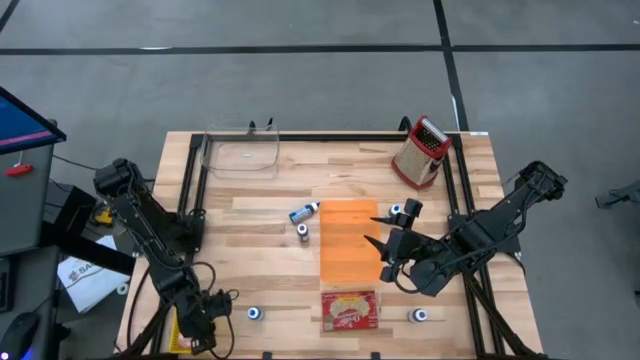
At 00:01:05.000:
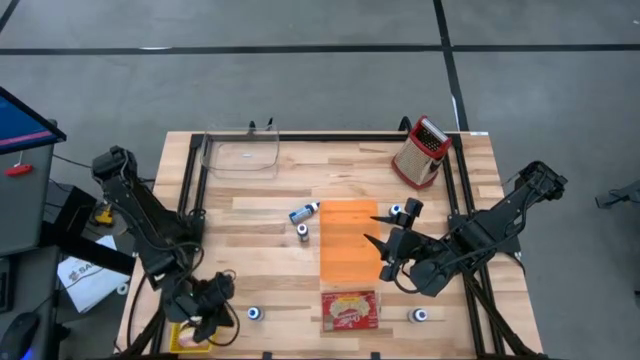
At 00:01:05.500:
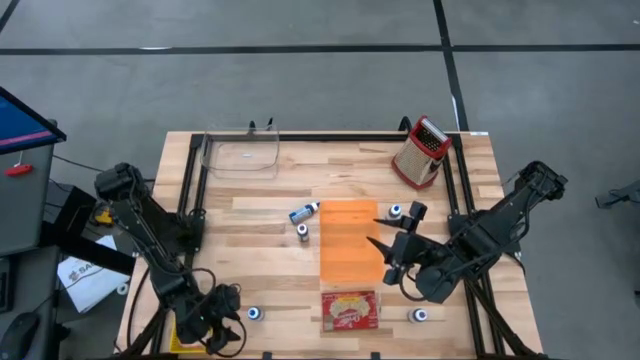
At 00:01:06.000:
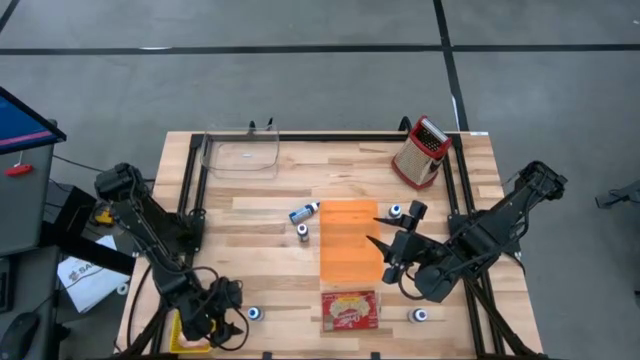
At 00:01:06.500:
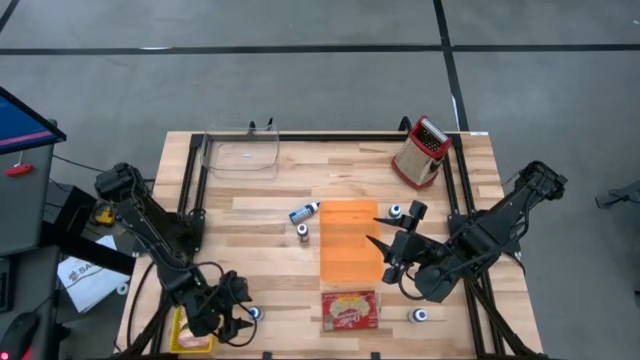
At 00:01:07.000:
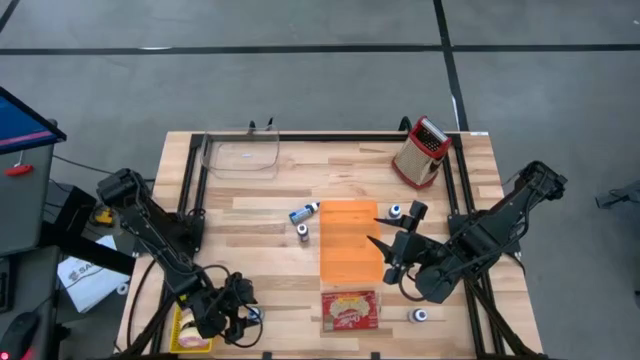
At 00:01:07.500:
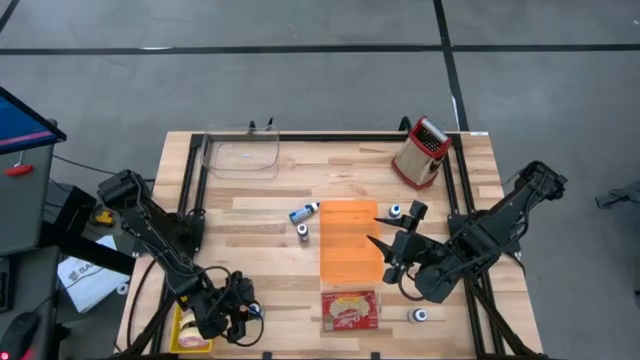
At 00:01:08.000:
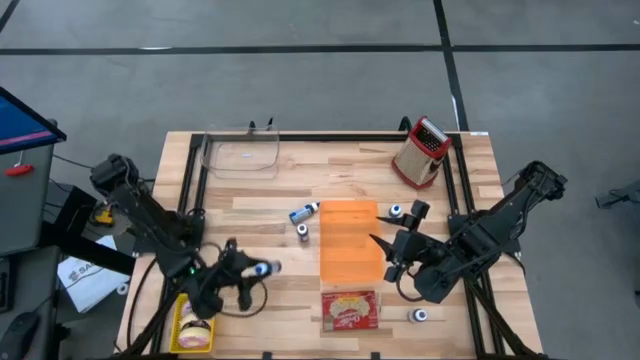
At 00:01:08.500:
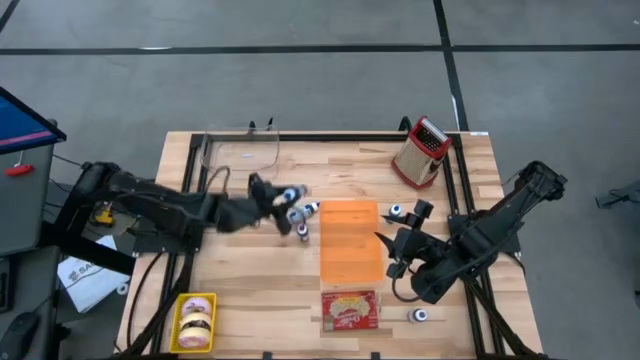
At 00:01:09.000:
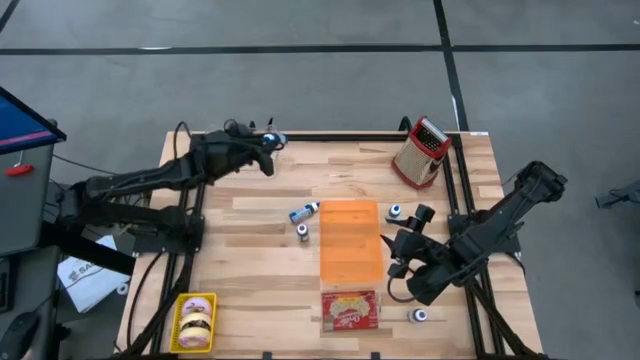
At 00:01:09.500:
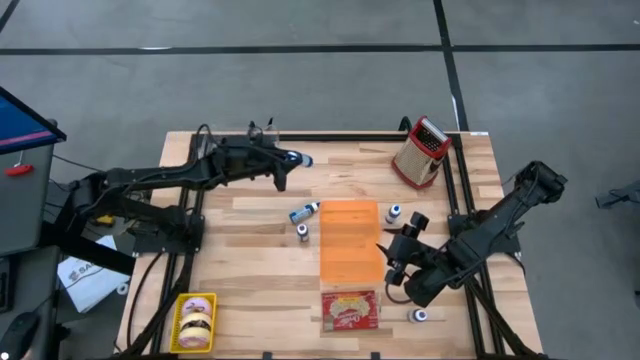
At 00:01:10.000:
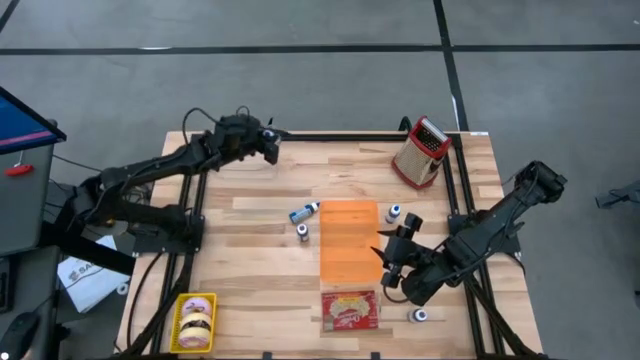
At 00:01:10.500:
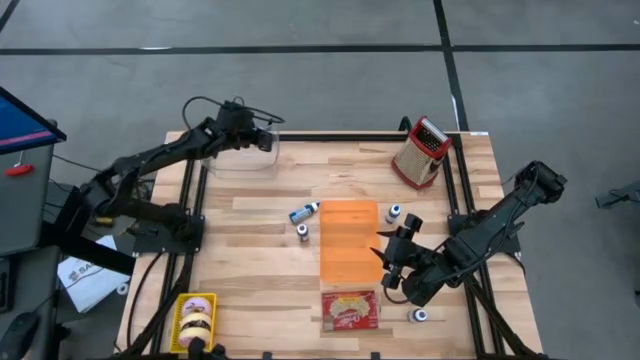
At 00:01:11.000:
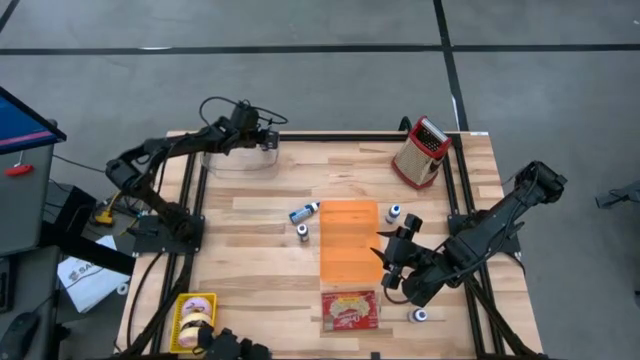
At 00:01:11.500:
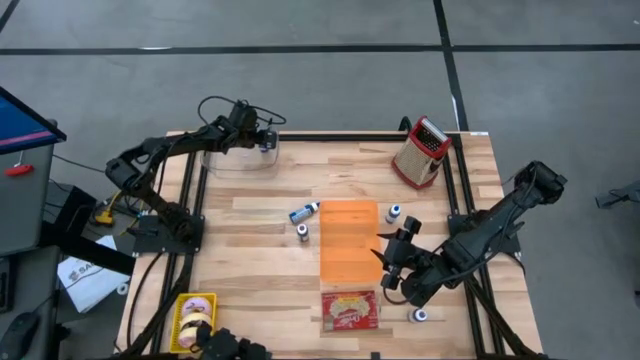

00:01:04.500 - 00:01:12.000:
Task: Pick & Place Food Item
Put the left blue food coloring bottle into the transparent bin

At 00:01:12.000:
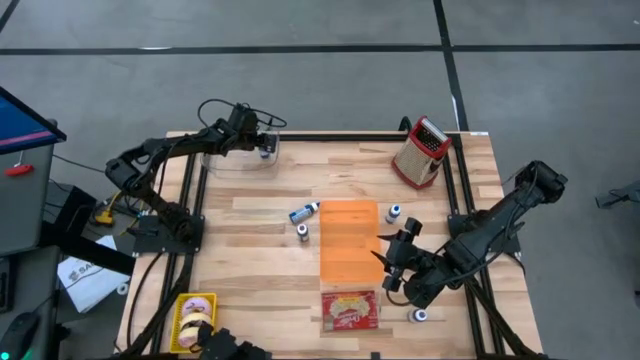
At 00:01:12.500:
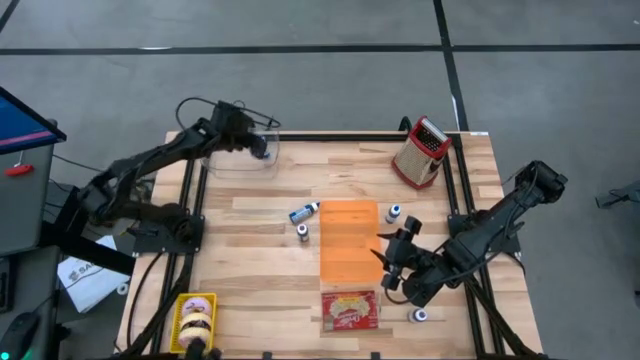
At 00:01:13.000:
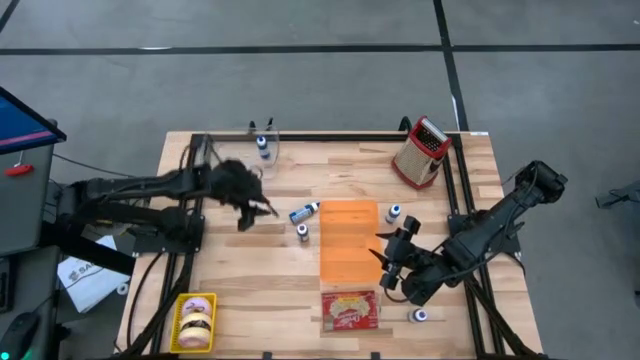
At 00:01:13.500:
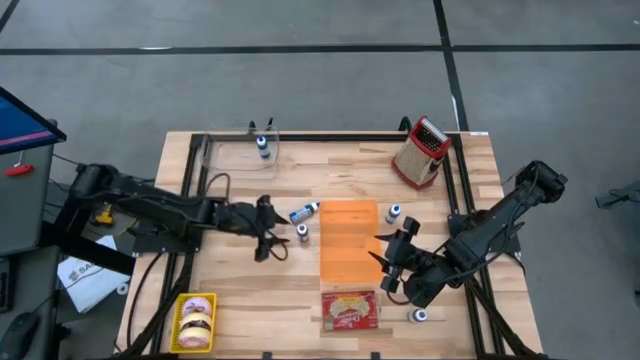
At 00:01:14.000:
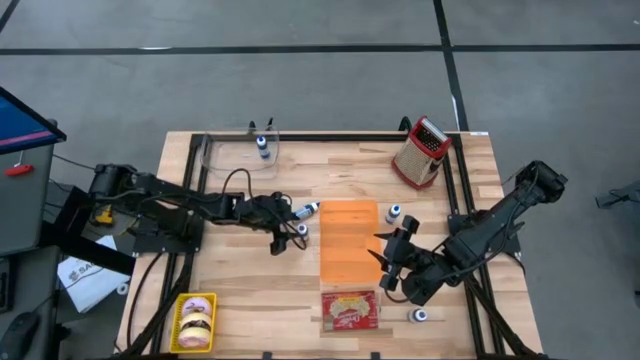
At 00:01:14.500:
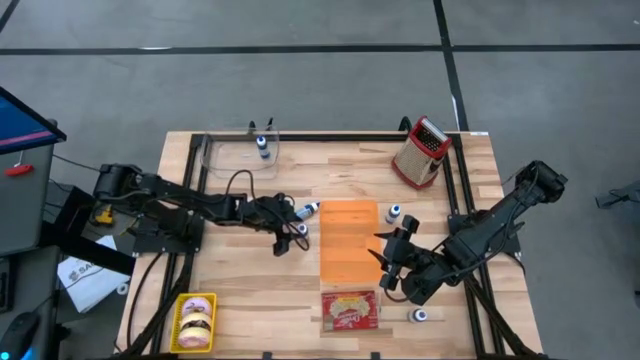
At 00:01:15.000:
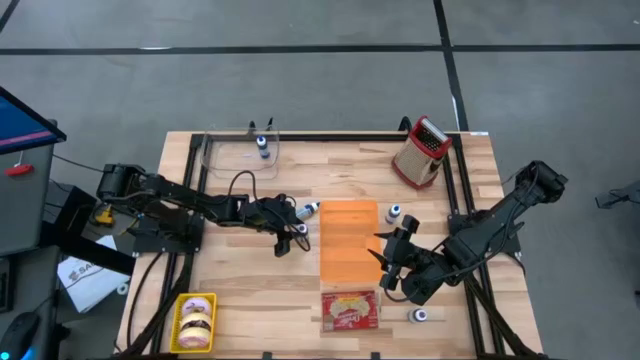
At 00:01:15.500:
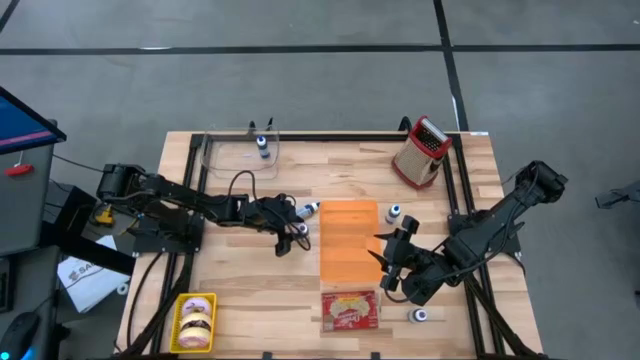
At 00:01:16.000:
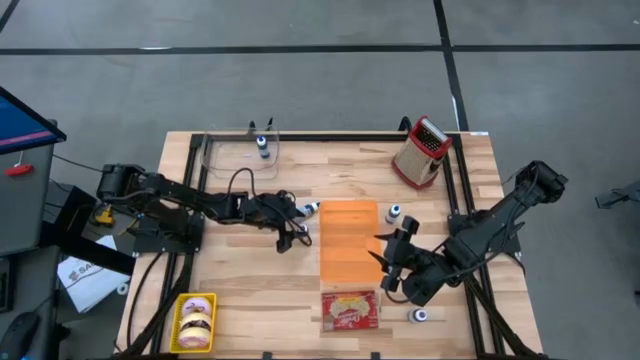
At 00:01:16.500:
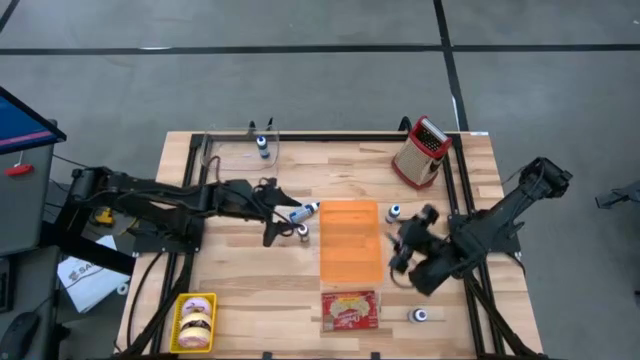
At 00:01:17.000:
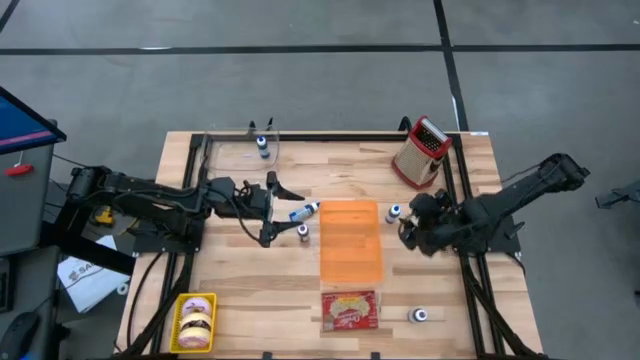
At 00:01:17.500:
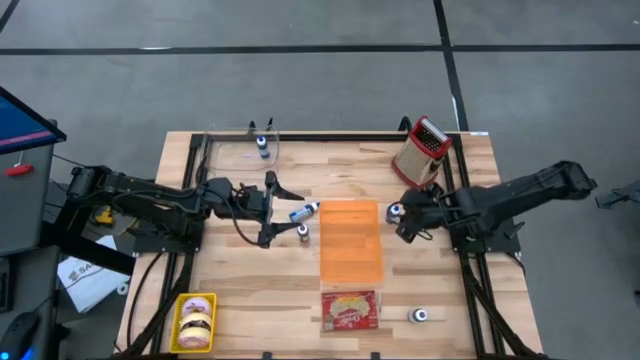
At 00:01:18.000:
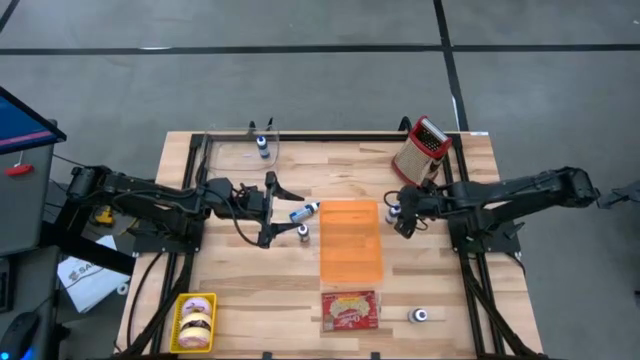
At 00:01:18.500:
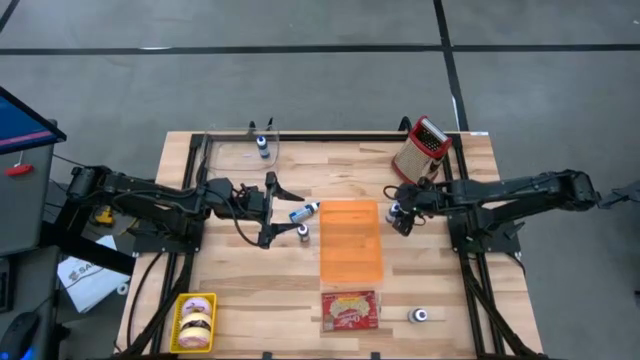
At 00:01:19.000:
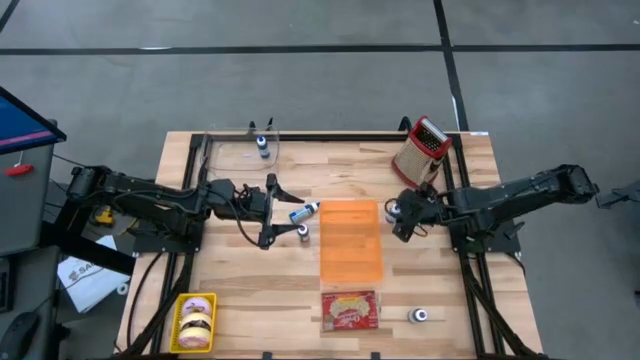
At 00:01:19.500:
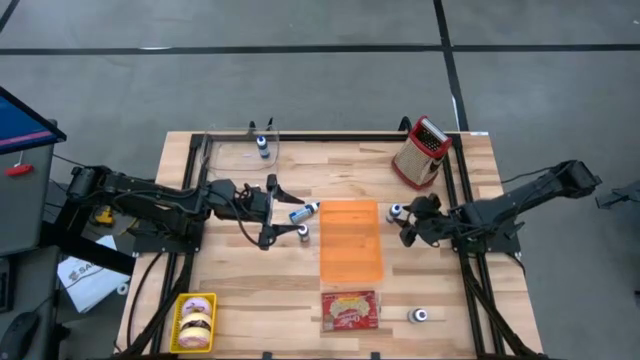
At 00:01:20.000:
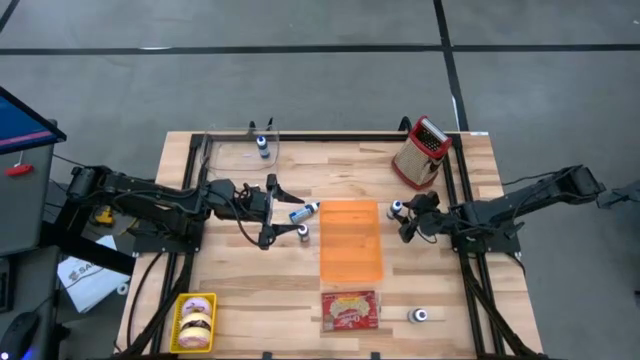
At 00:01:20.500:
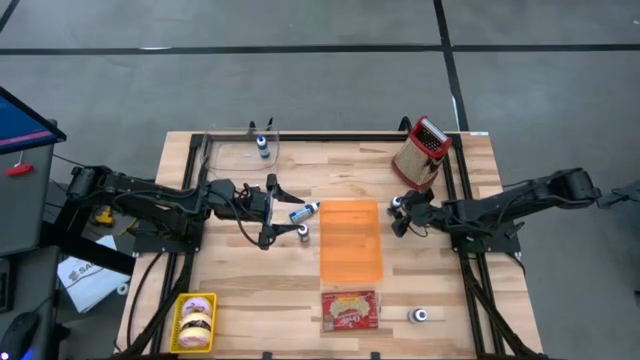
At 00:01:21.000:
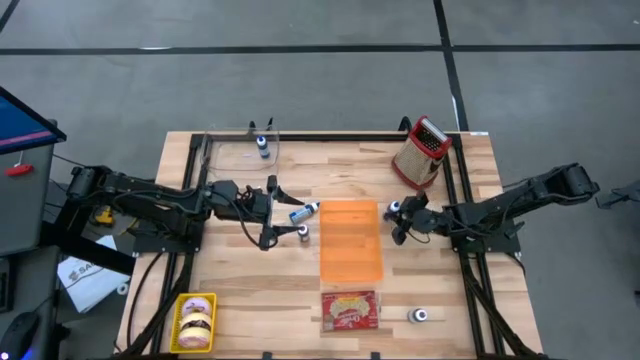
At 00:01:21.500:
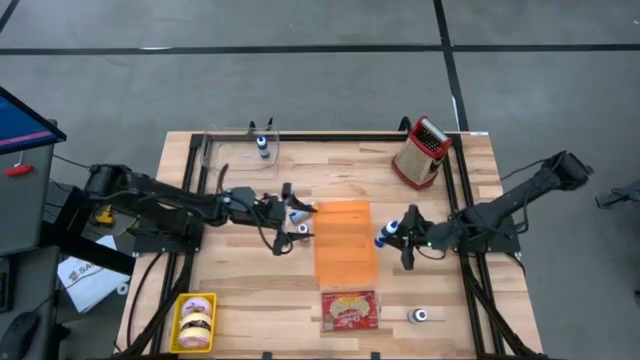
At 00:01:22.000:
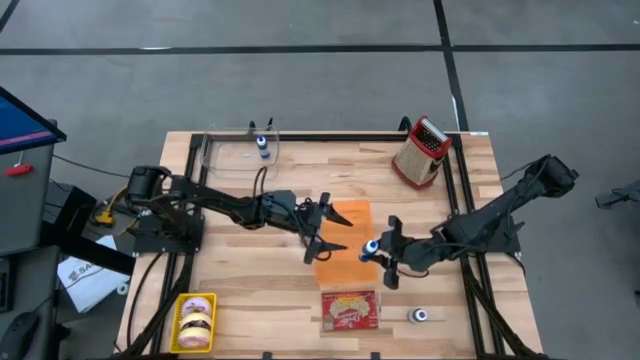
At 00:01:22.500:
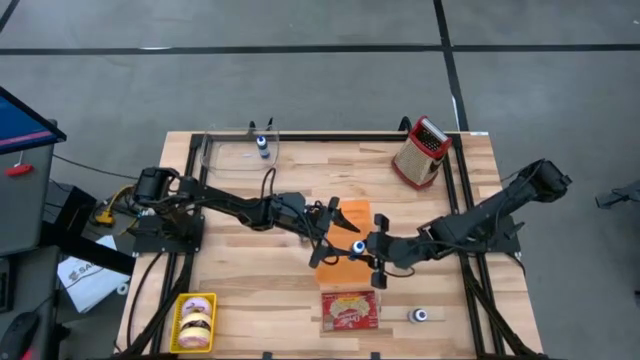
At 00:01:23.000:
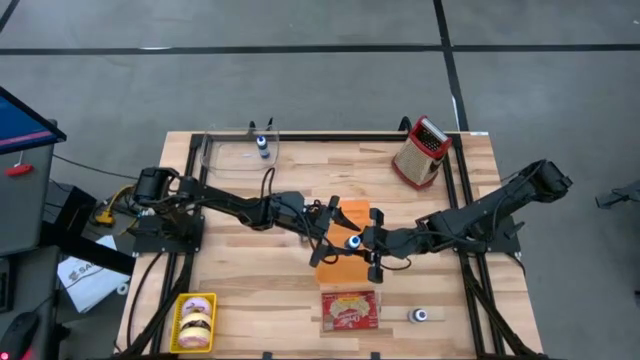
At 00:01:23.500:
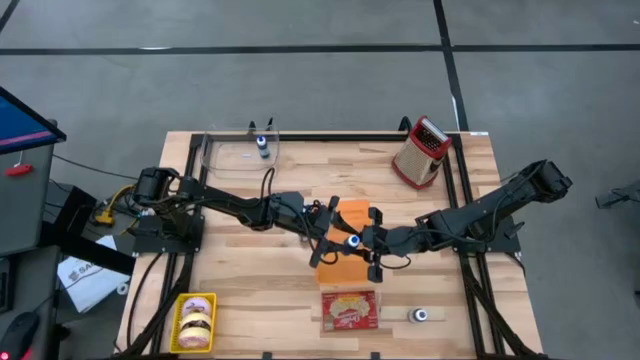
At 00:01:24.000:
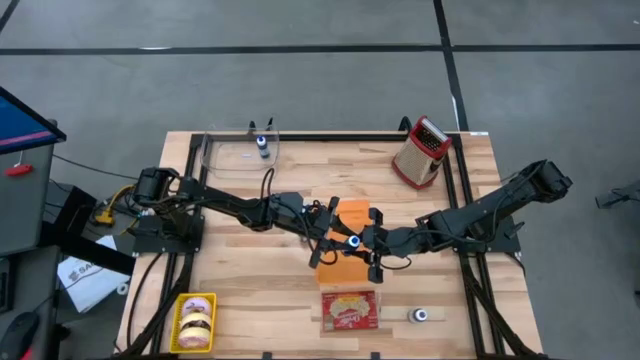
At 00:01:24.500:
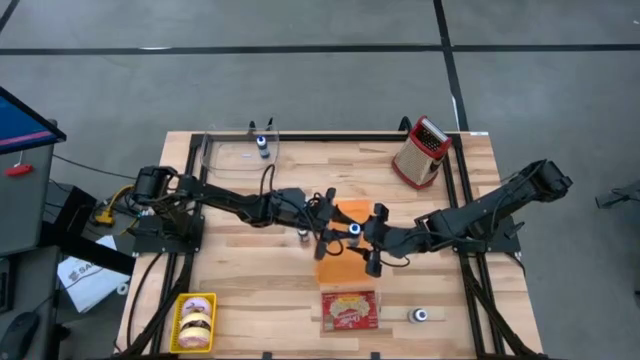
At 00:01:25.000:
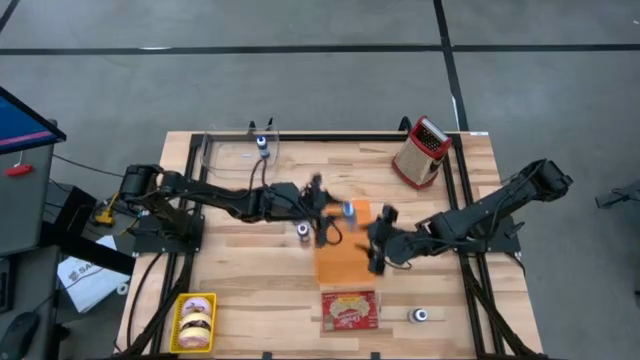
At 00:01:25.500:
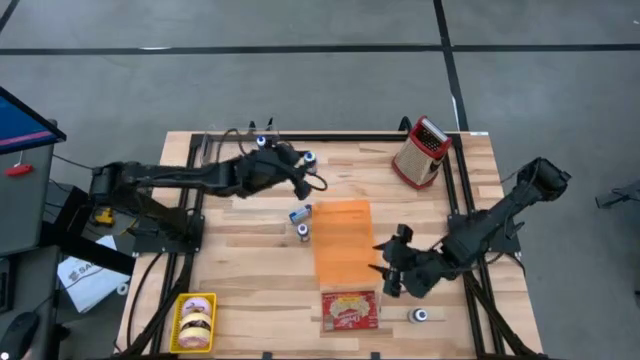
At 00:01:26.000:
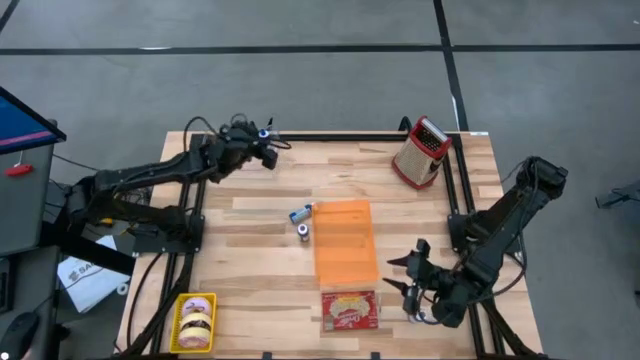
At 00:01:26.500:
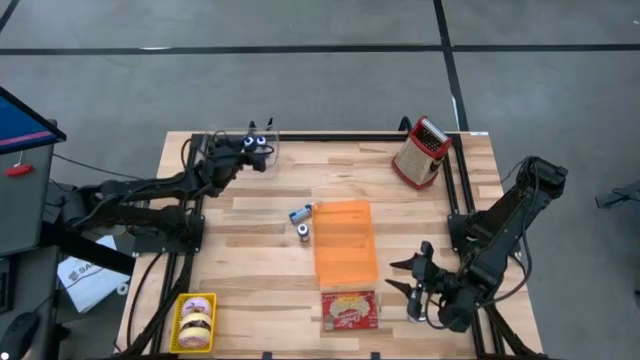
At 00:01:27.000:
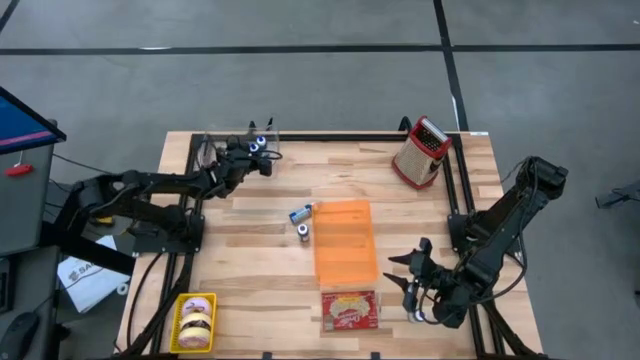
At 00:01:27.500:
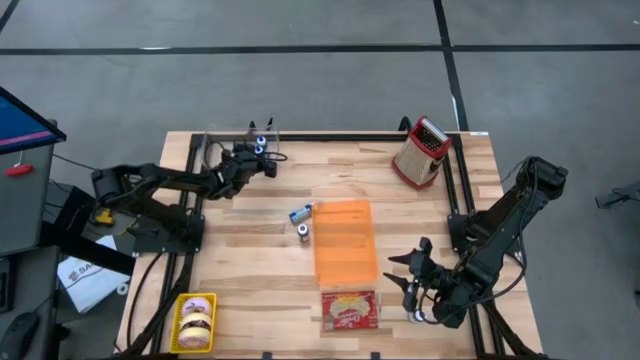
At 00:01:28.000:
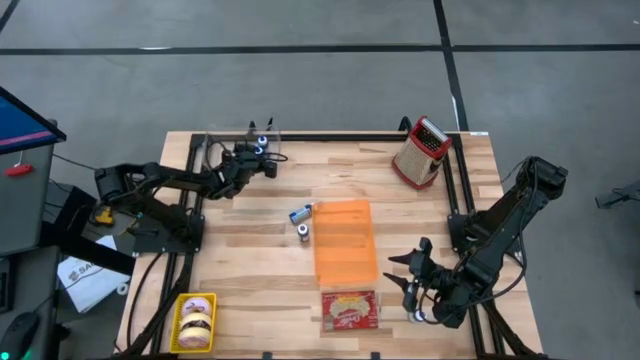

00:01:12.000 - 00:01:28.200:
Put the right blue food coloring bottle into the transparent bin
